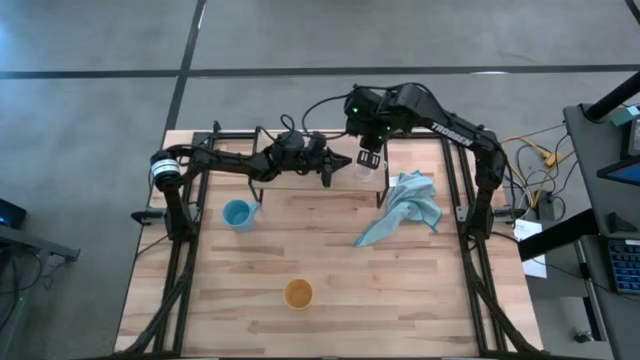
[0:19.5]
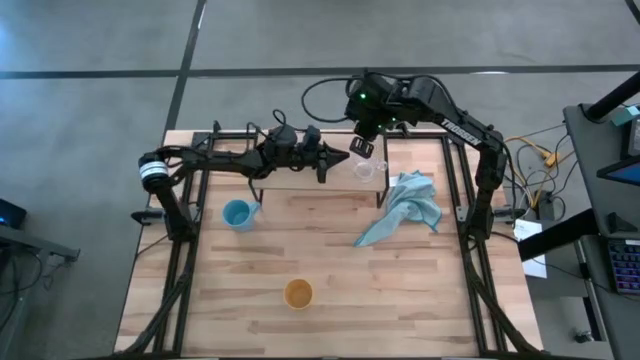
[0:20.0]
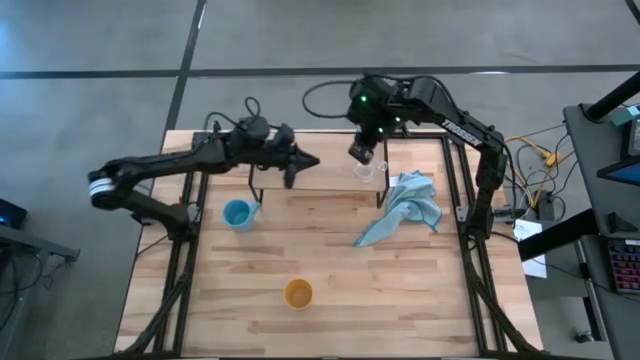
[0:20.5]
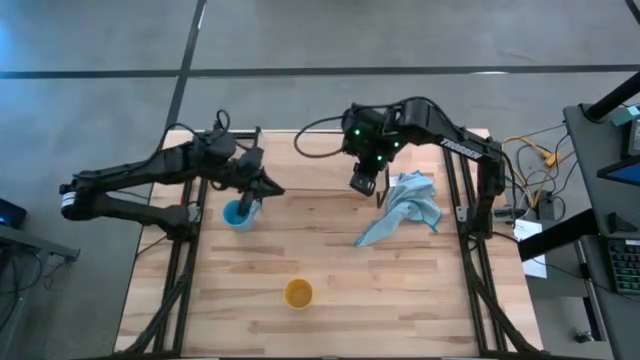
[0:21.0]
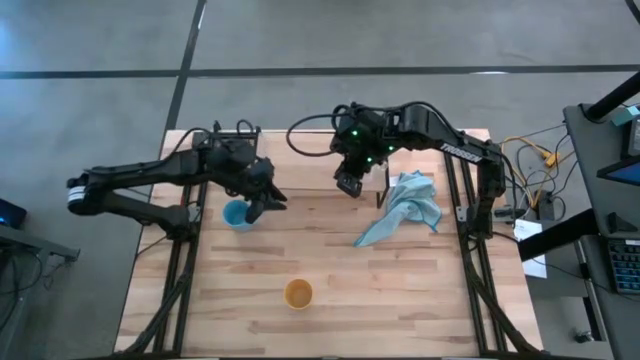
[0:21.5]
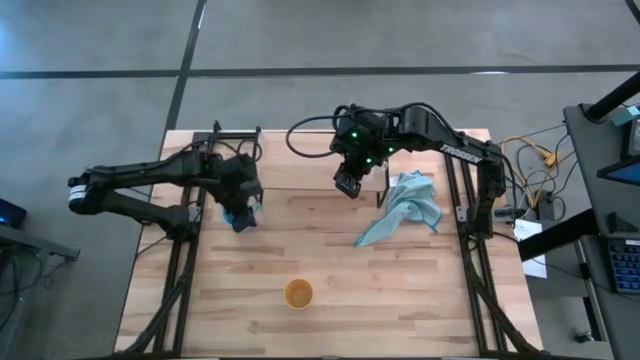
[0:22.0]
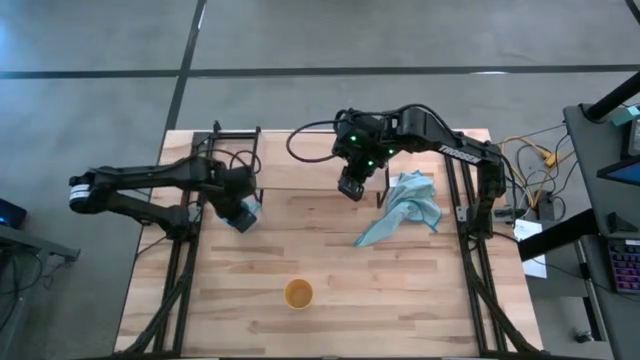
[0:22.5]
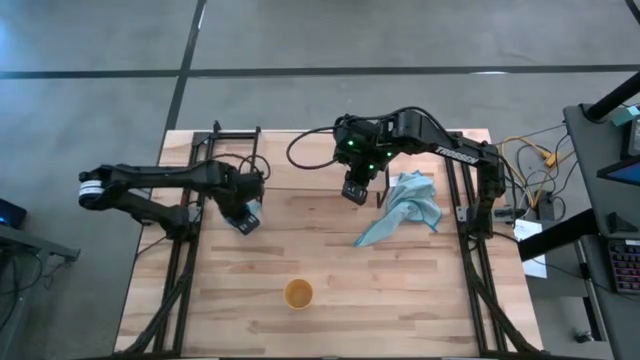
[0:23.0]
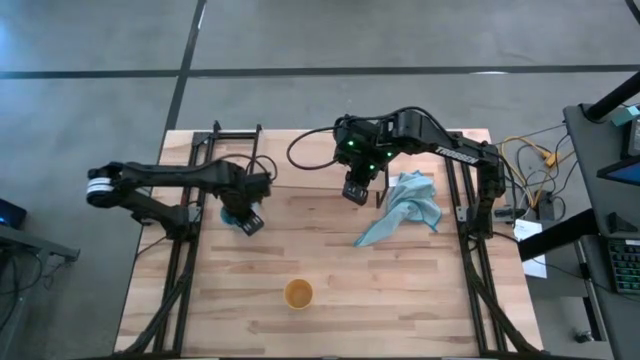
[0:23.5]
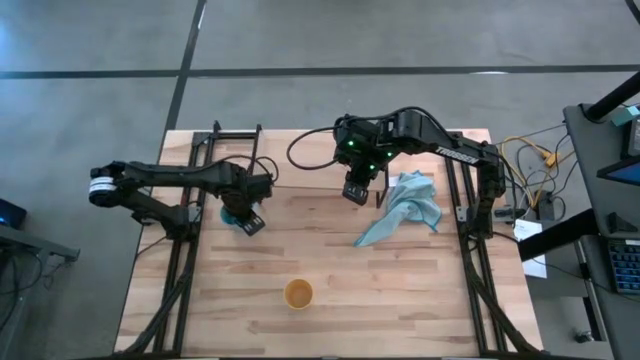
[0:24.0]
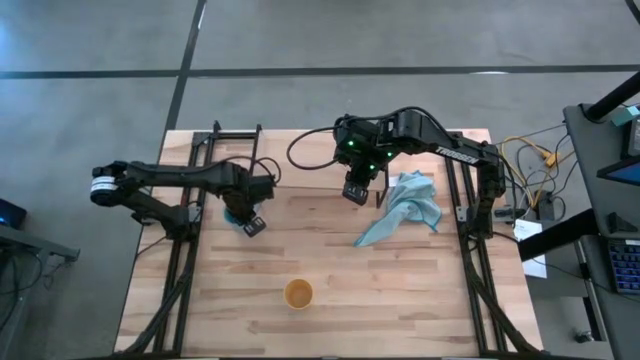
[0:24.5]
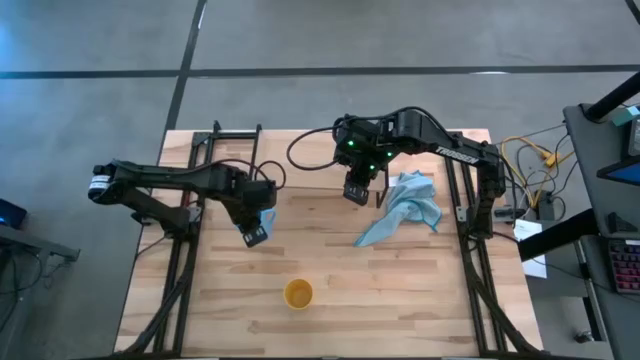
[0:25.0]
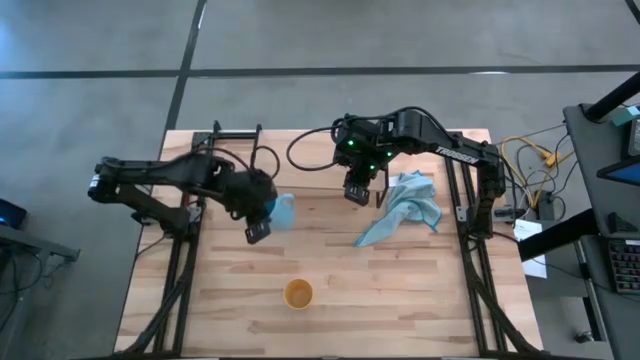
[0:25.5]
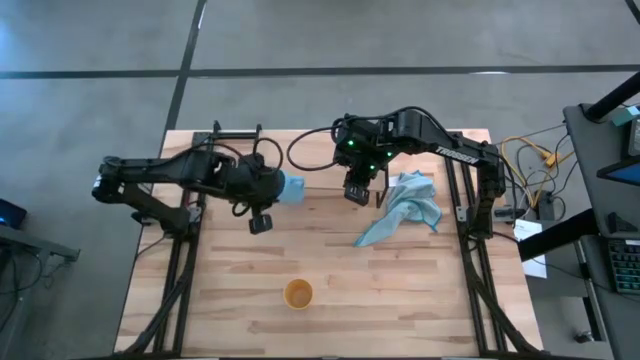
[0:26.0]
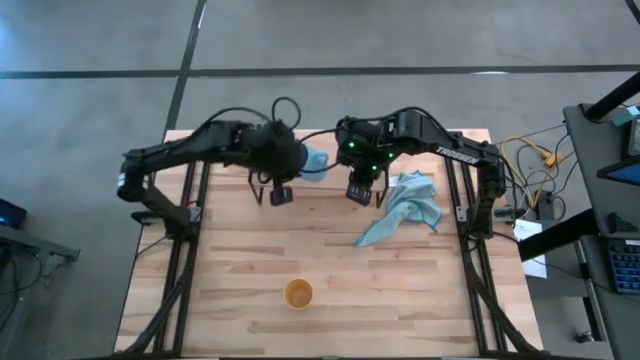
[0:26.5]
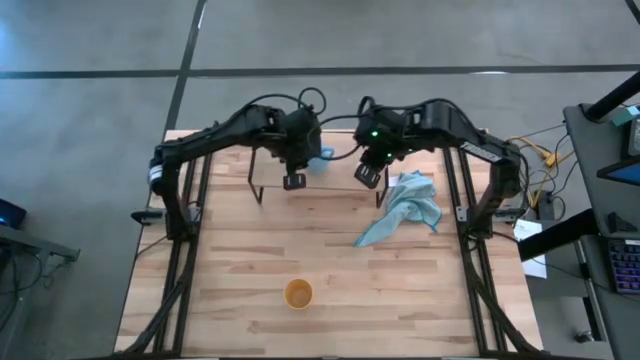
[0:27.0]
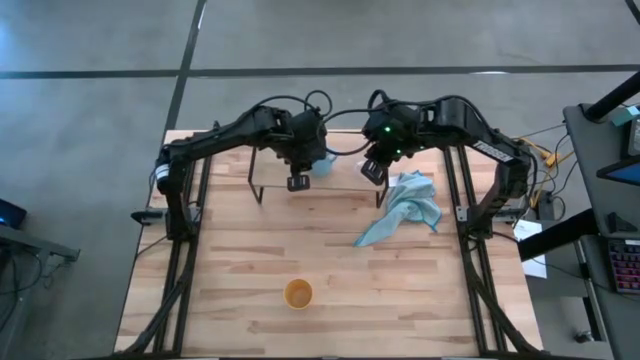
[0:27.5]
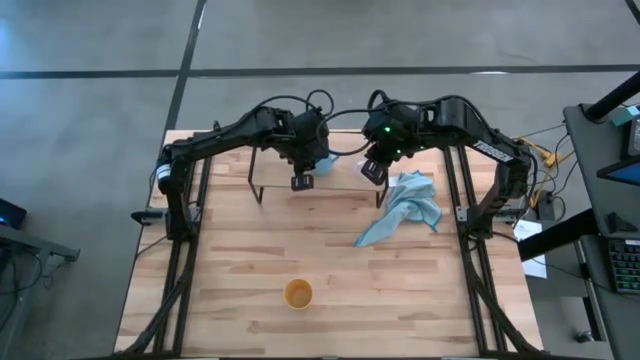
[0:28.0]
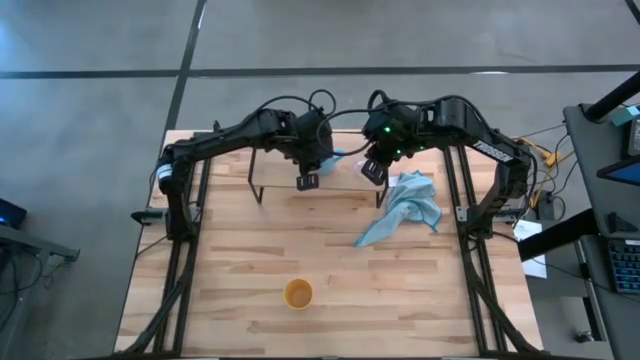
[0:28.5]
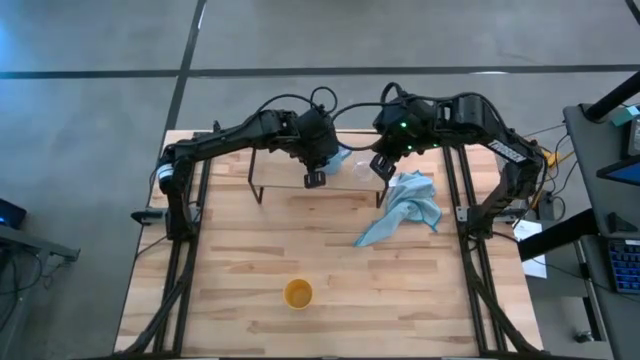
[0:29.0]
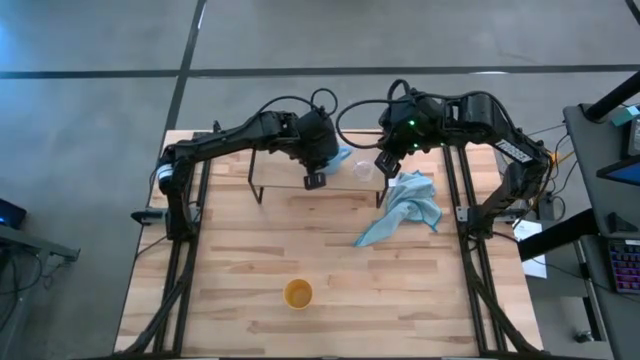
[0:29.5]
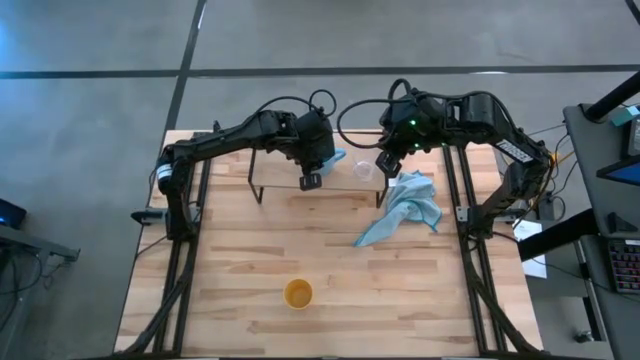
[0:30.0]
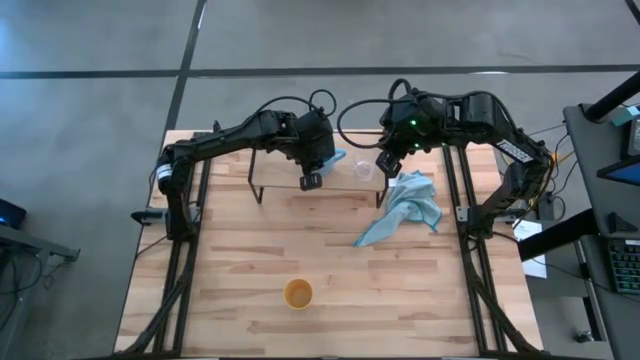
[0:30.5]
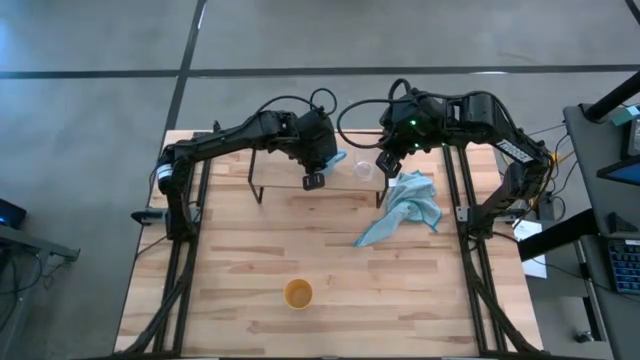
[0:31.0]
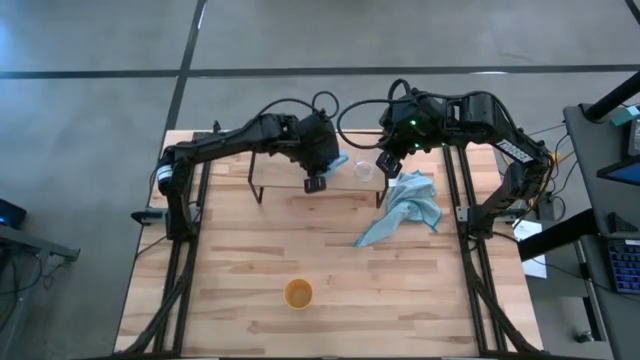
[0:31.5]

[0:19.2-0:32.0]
Task: Stack small to large cups/mugs on shelf
Put the blue mug on the shelf

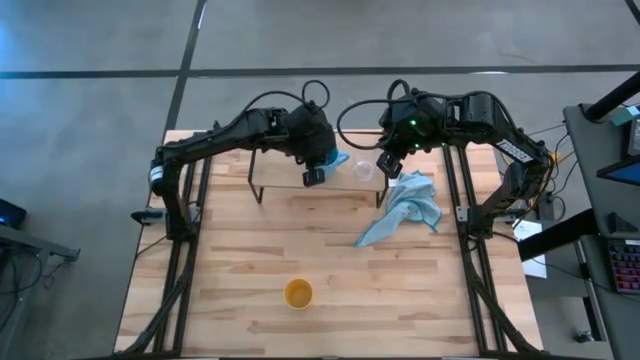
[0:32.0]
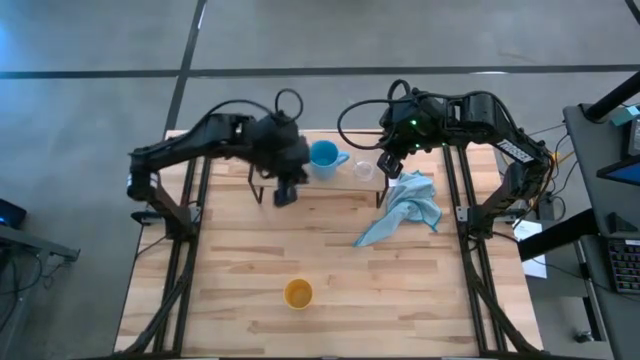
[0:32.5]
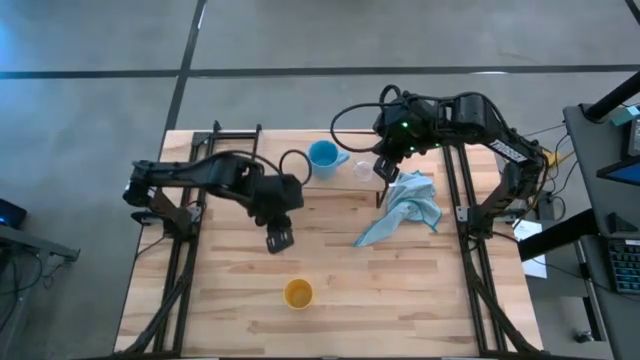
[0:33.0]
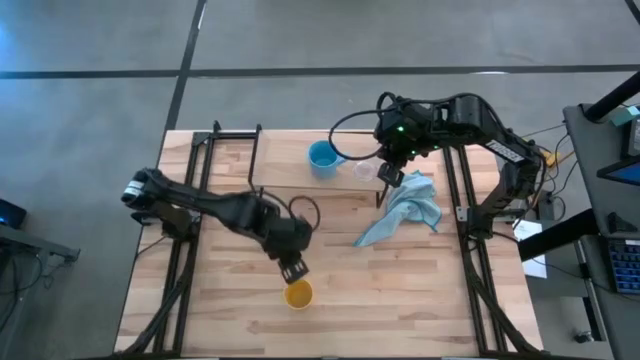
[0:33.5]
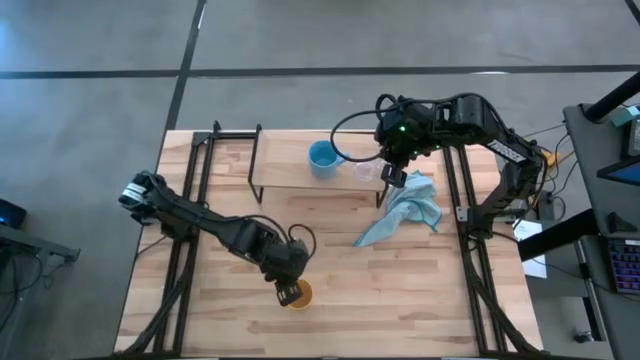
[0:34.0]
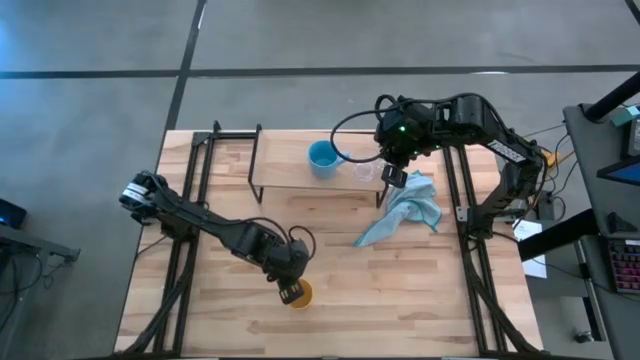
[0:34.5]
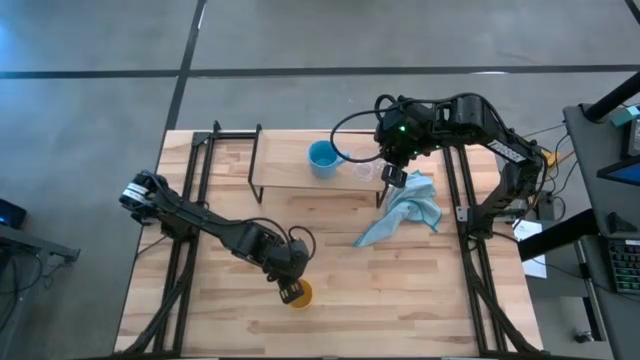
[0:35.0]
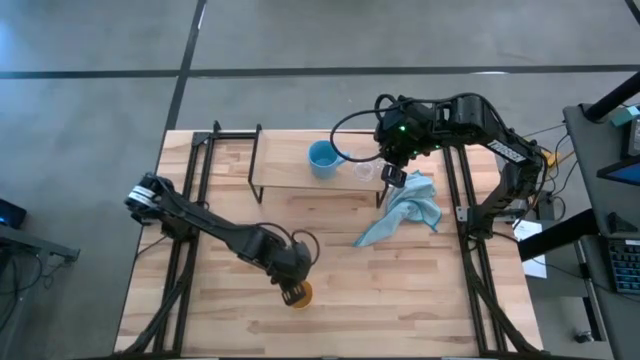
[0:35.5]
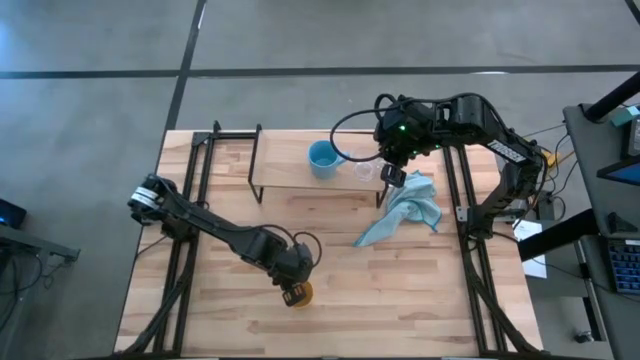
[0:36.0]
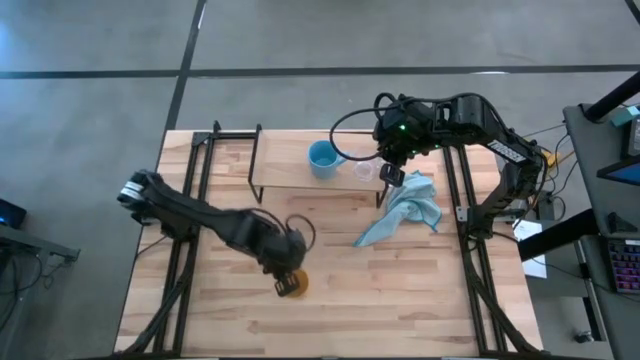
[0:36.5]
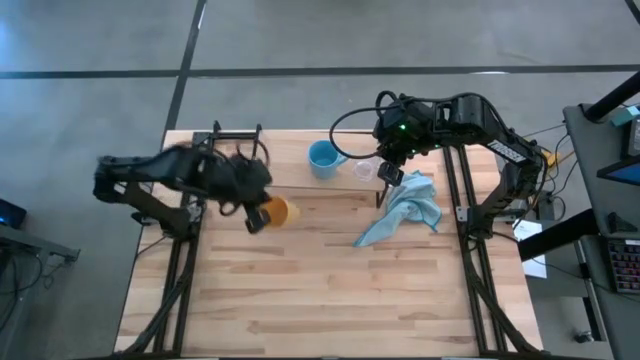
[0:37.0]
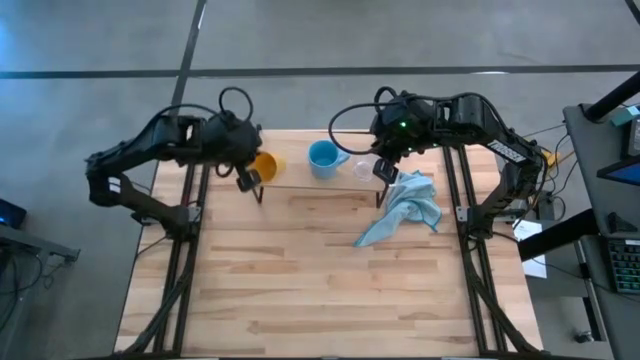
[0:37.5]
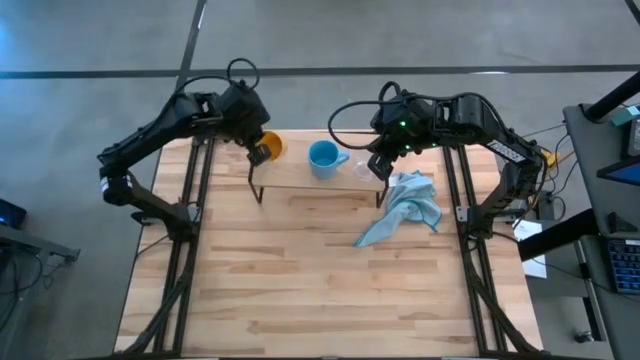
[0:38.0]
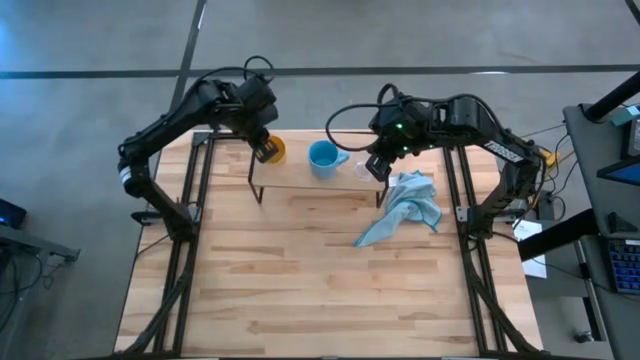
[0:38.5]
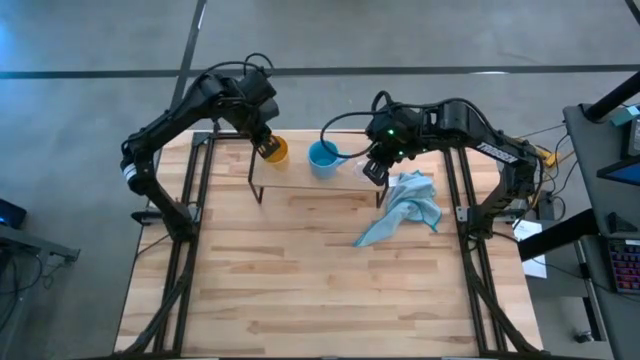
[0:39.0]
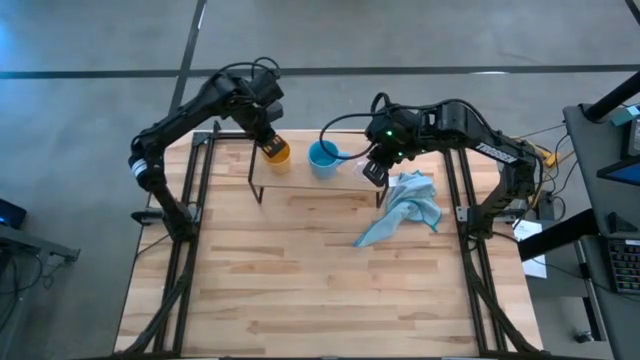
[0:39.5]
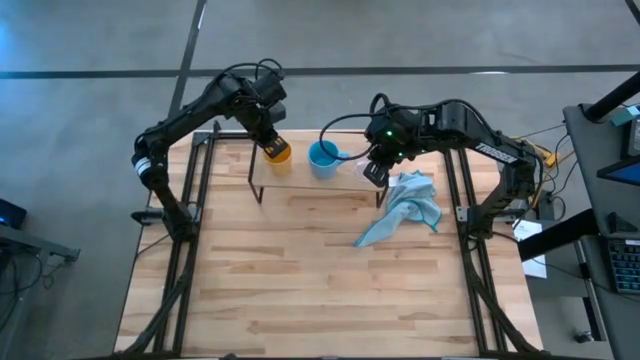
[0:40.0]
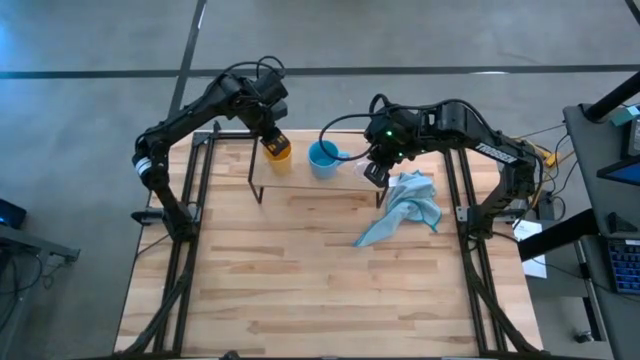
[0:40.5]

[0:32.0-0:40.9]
Put the yellow cup on the shelf
